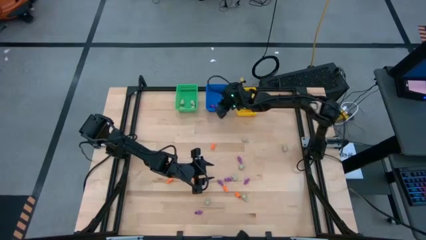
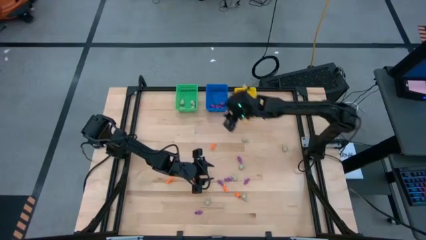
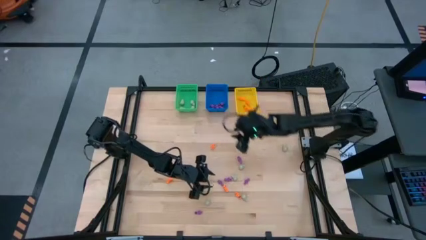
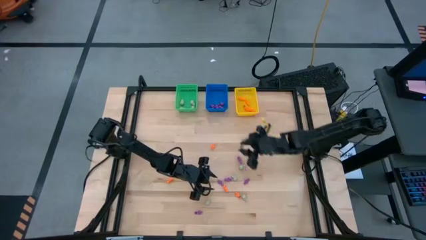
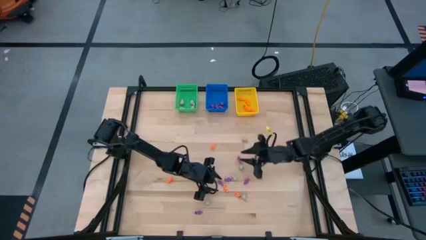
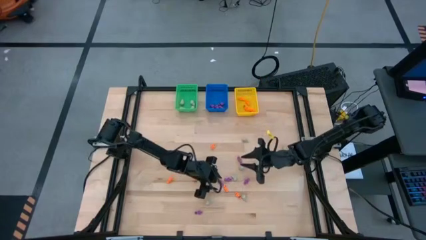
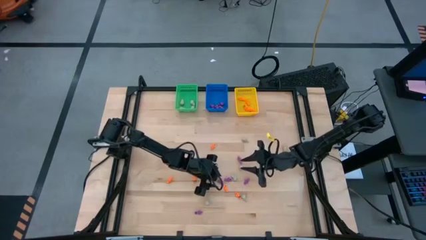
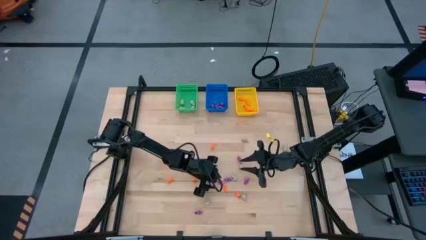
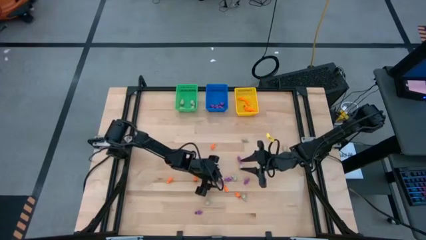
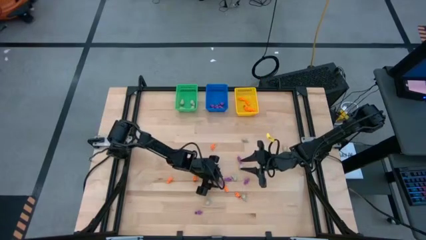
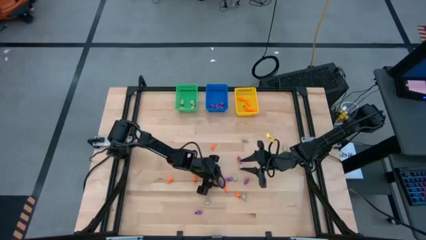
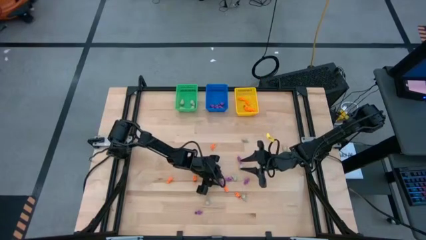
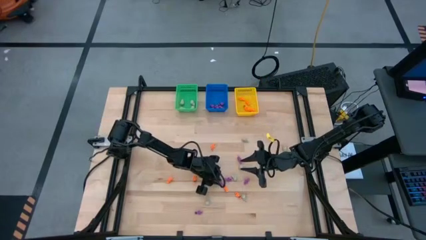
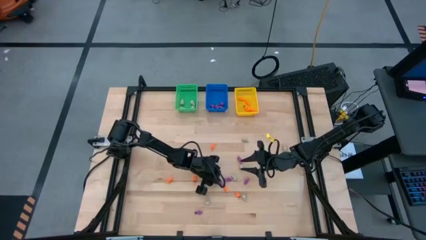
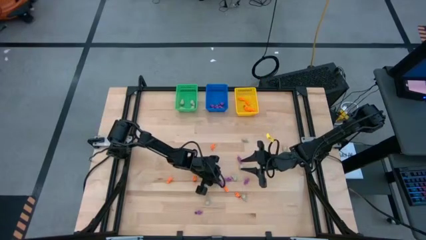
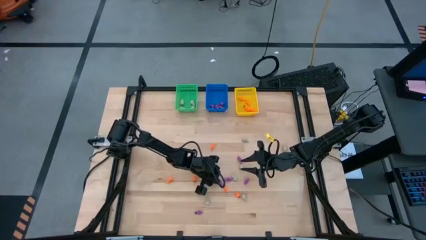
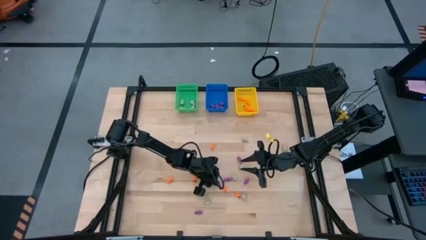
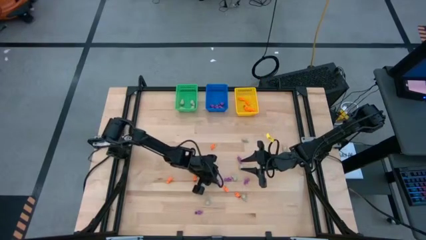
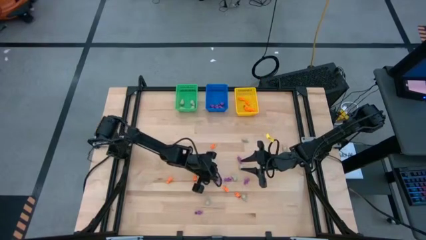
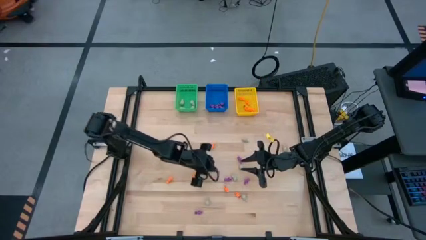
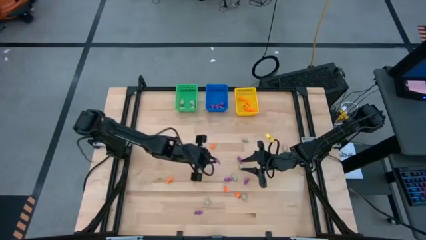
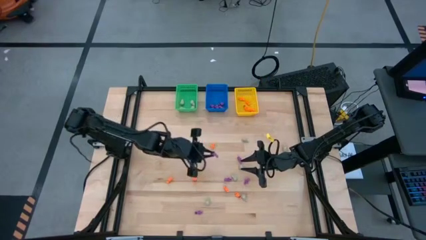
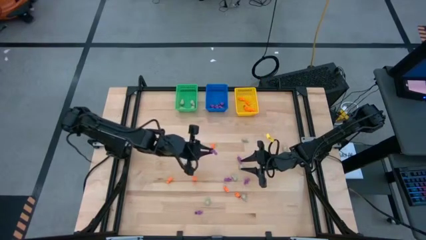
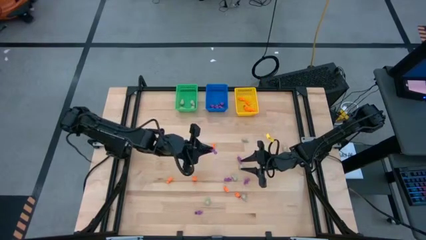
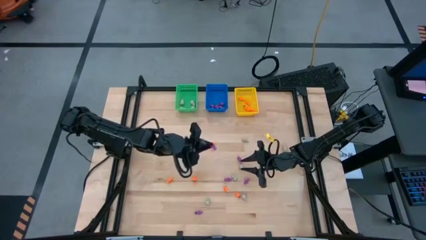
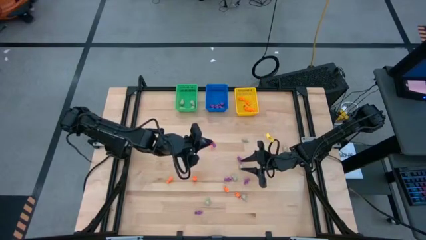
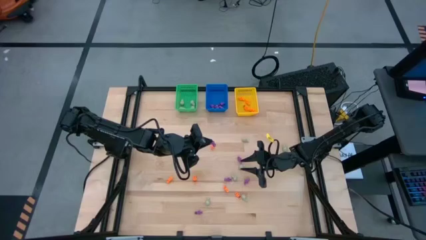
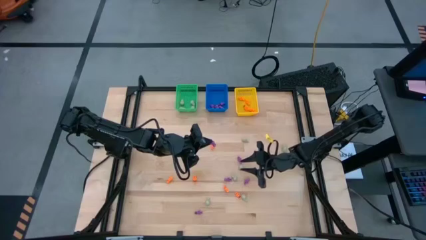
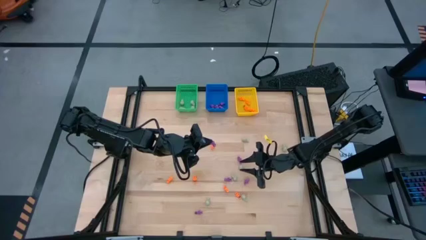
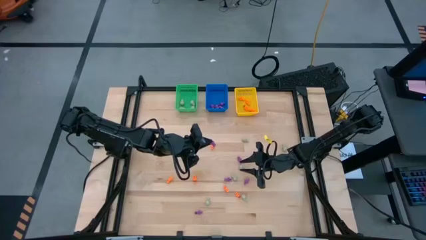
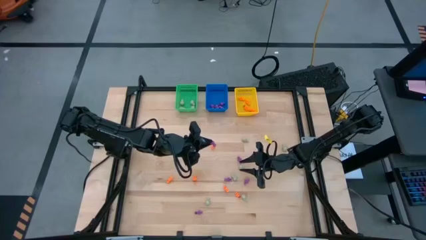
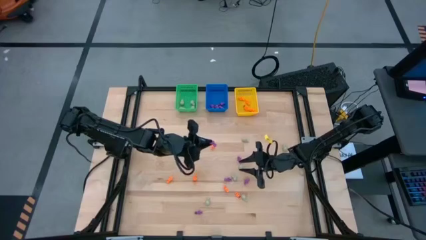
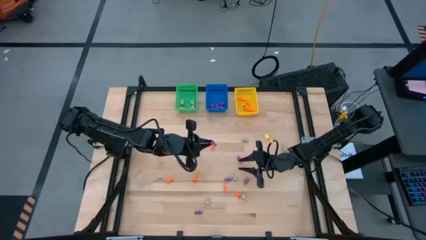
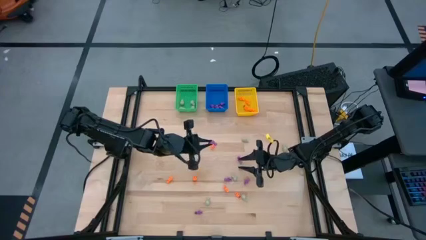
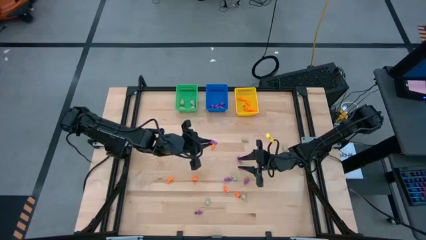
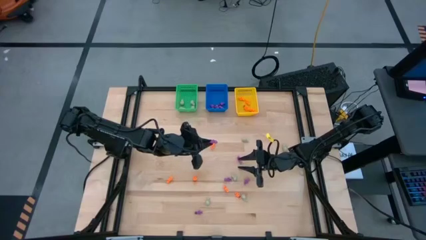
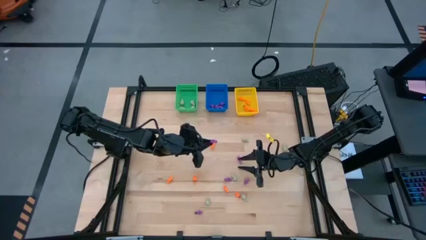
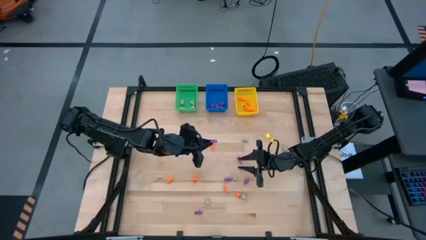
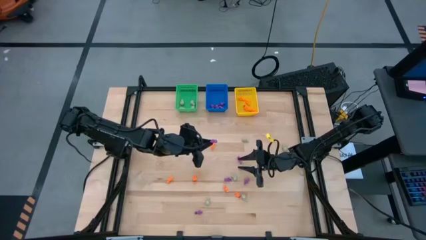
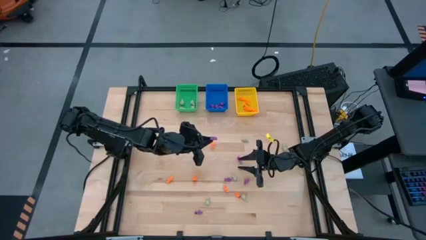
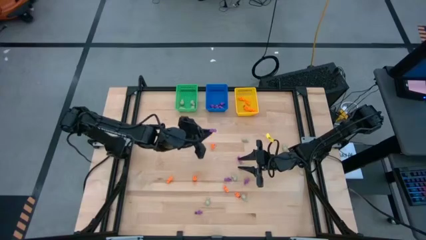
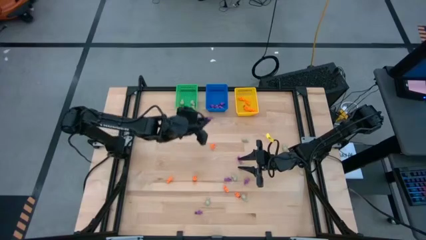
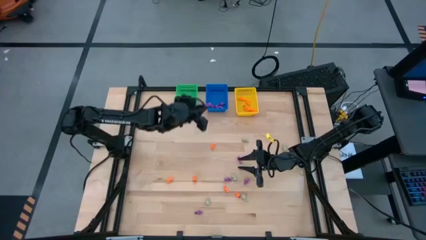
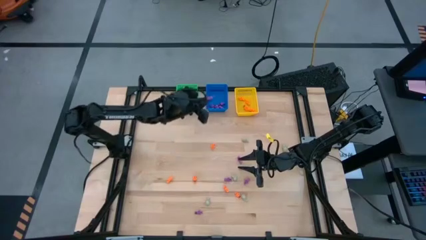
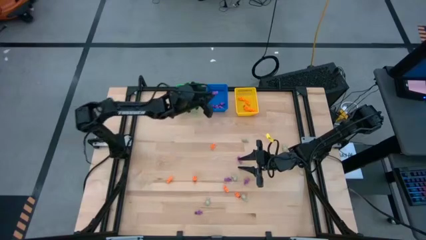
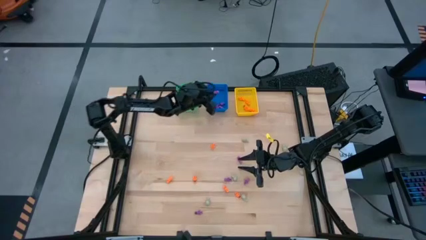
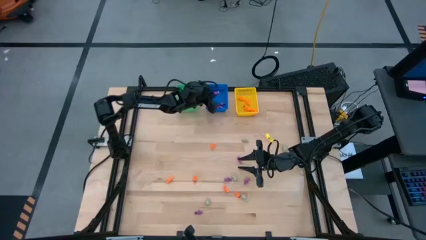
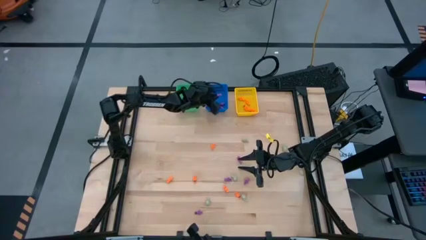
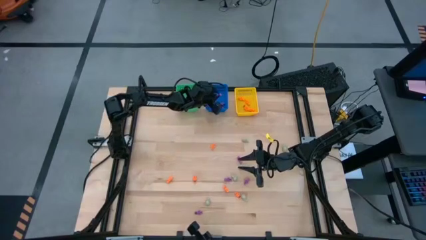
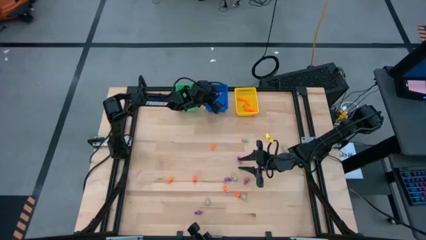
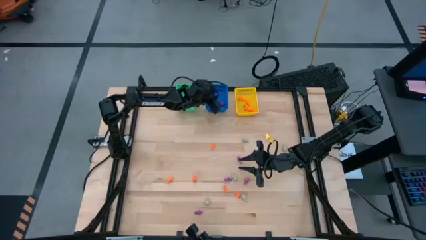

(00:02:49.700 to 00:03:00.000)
Task: Sort Halloween decoration
Put the purple skeleton toy into the blue bin

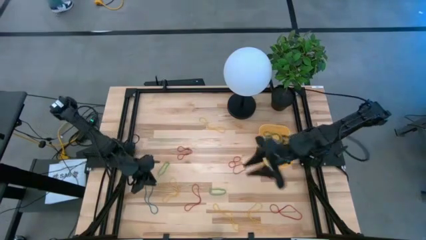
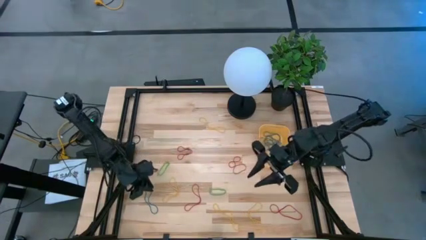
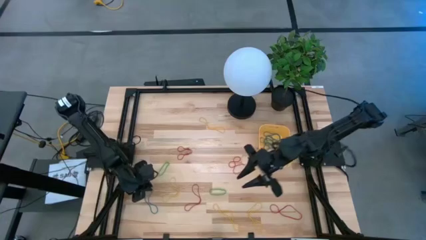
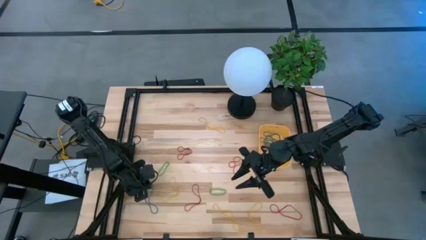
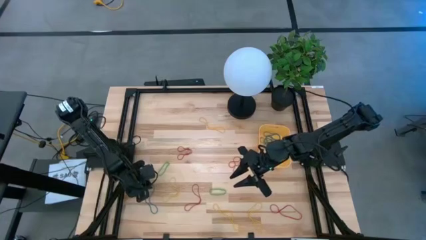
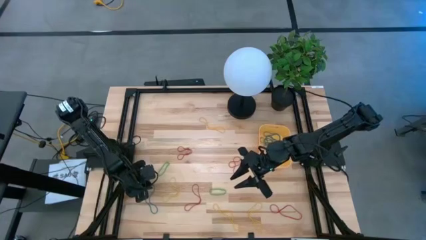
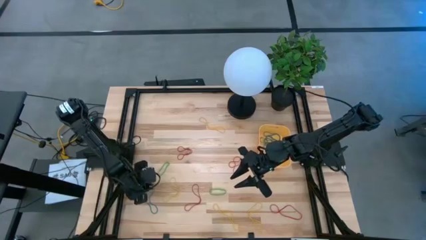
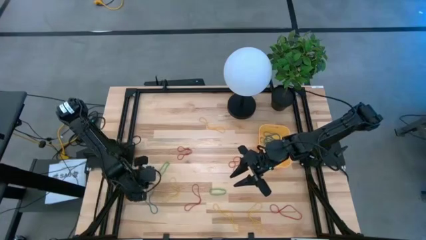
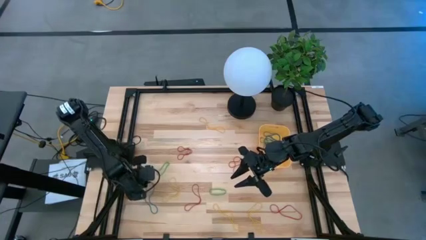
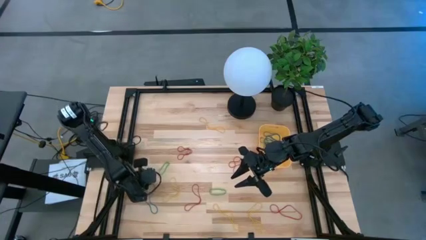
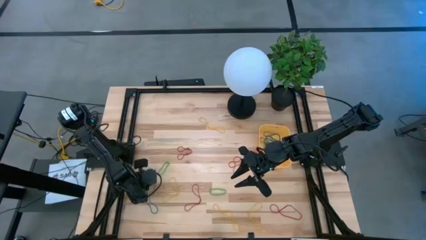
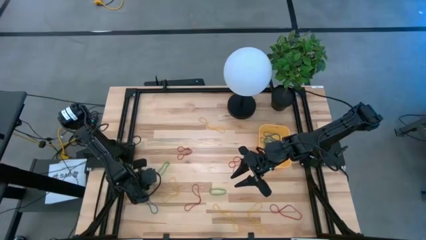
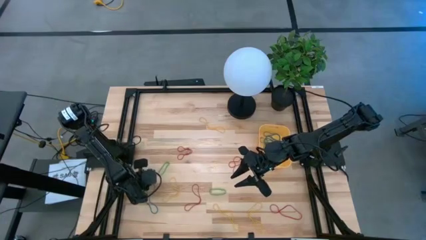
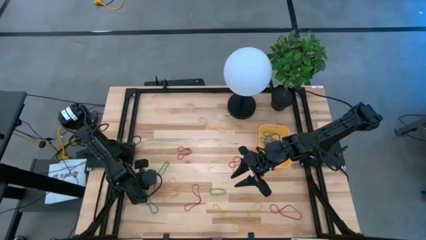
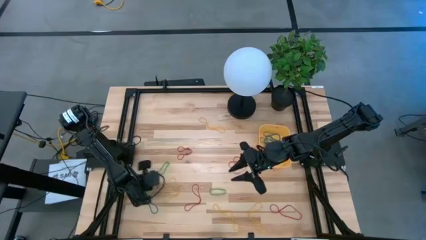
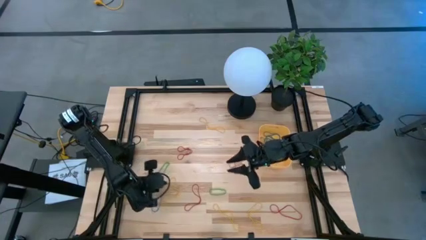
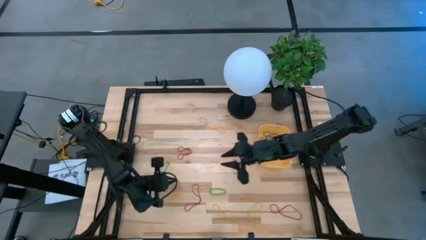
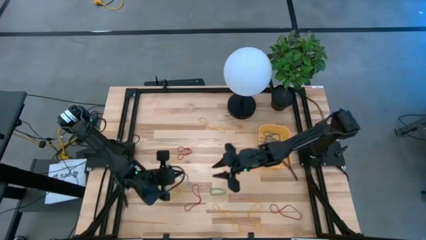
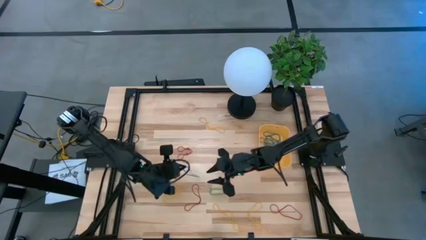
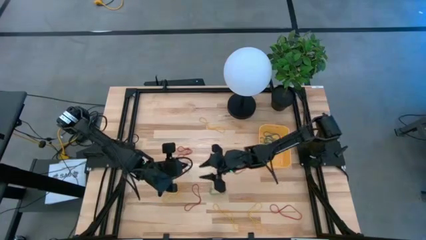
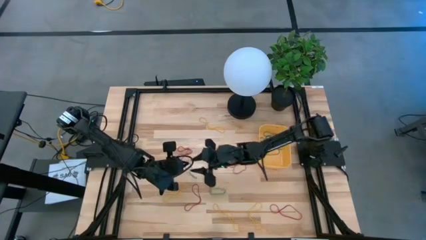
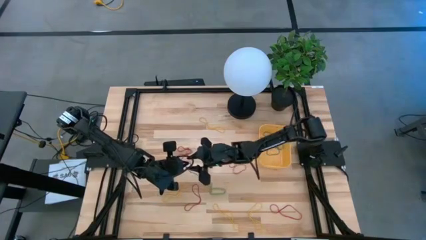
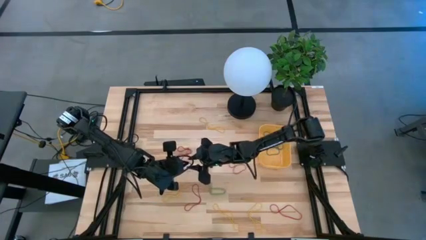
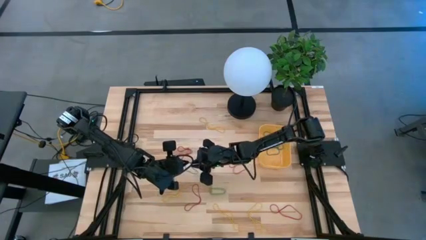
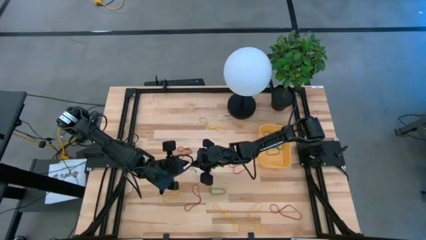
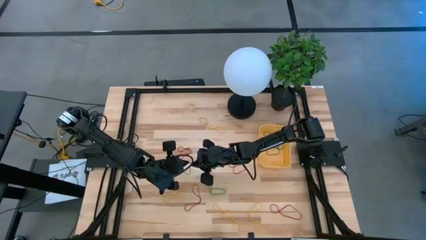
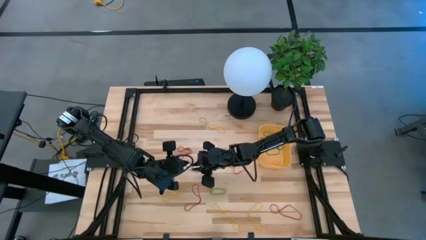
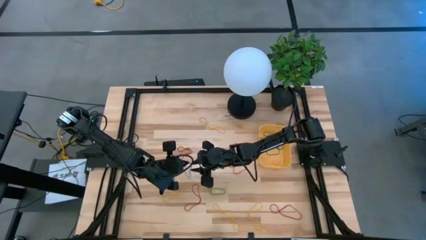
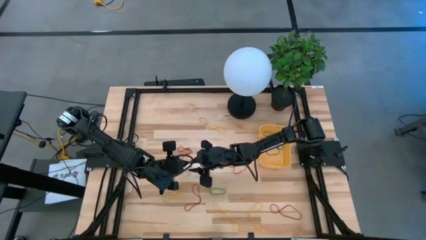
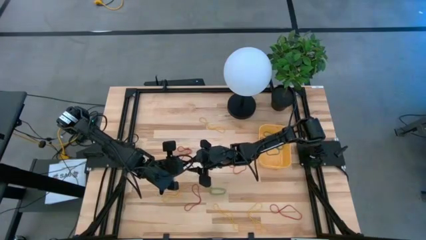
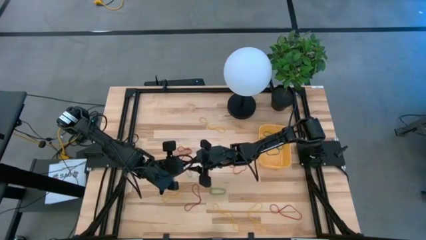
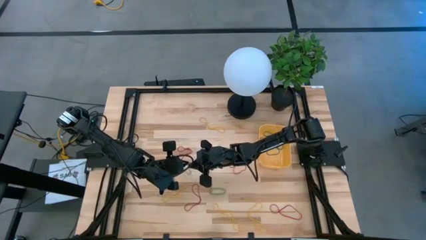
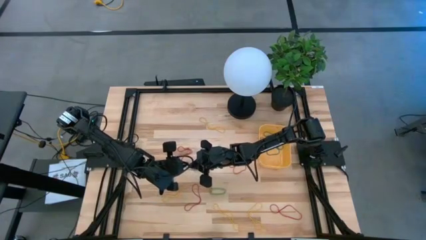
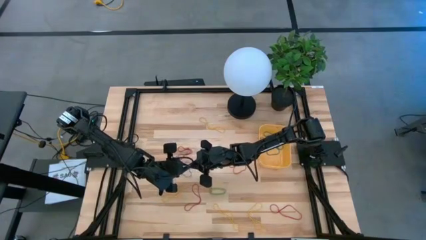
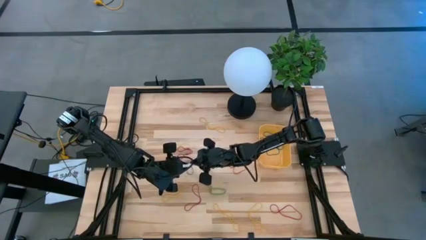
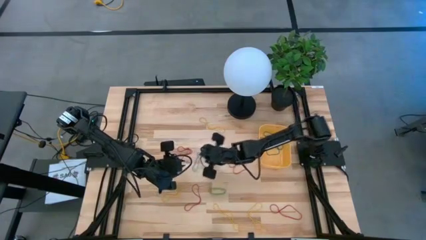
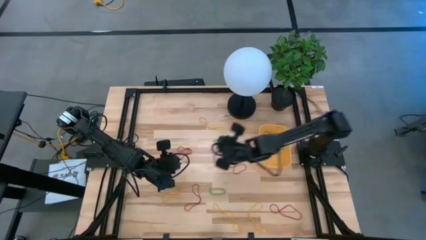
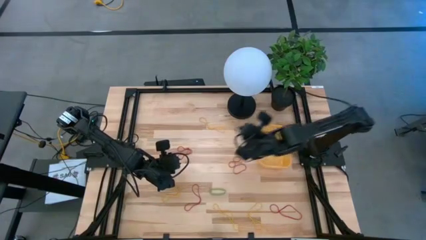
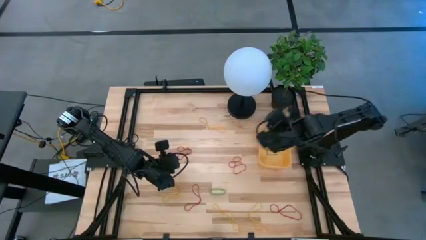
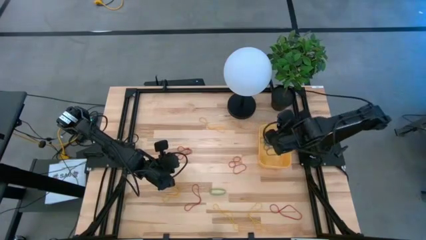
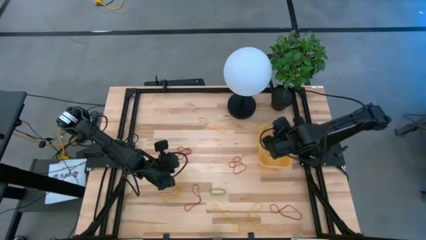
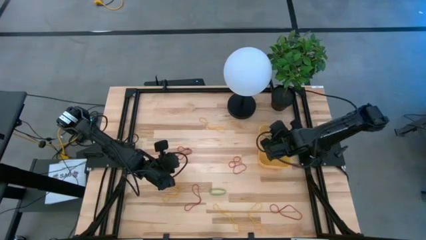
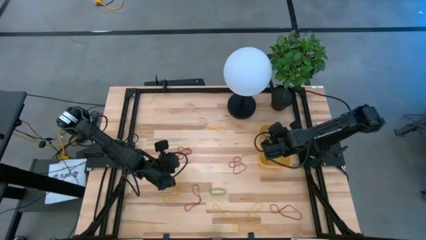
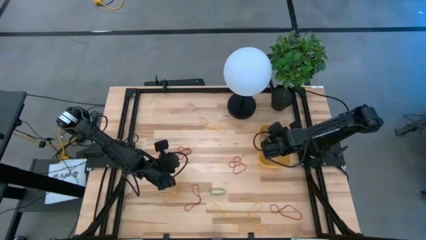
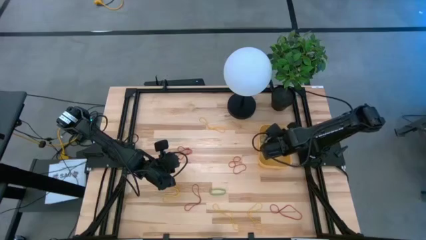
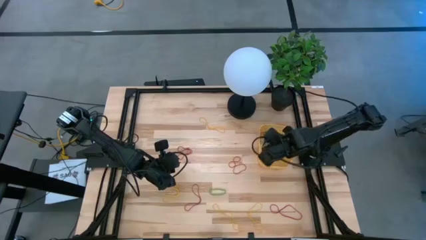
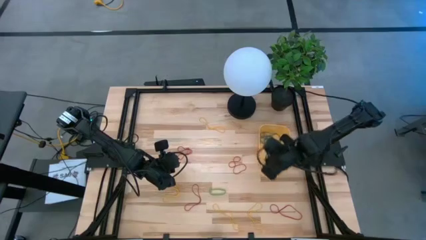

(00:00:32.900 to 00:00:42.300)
Task: Pick and place items into bin
Put the blue rubber band into the bin
